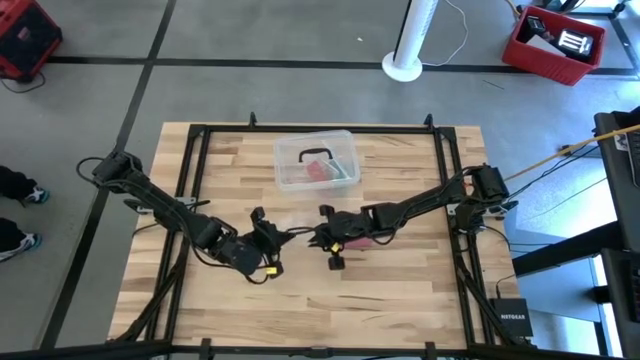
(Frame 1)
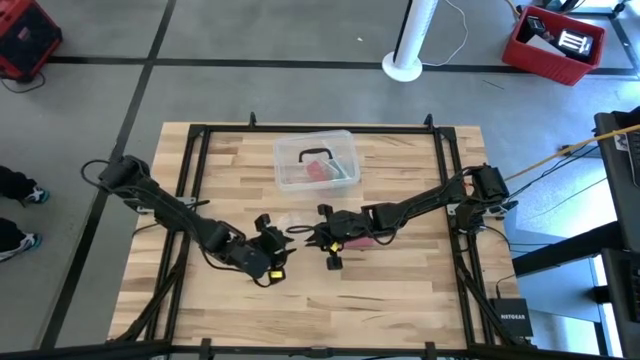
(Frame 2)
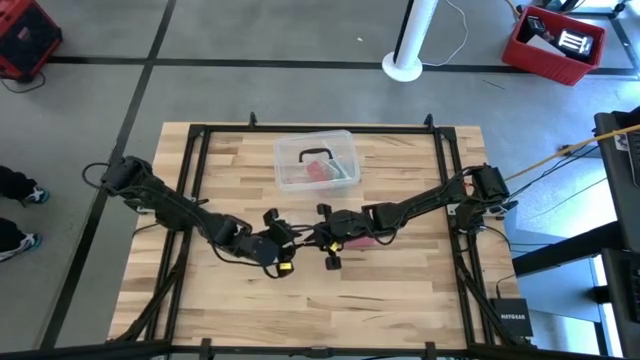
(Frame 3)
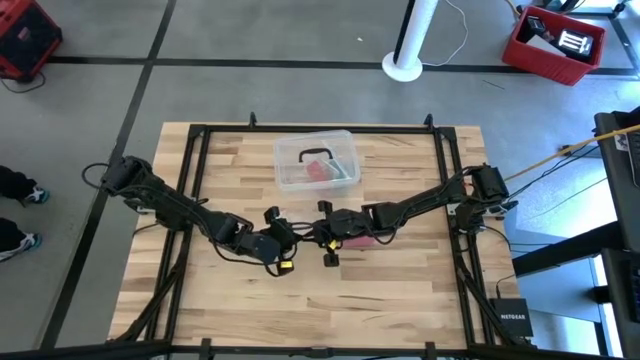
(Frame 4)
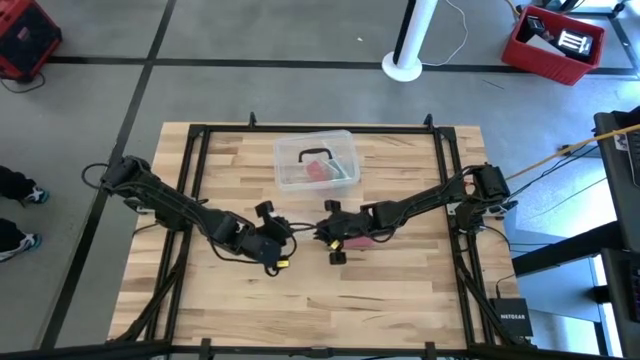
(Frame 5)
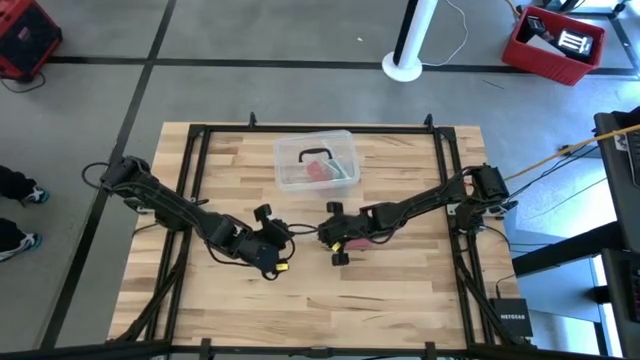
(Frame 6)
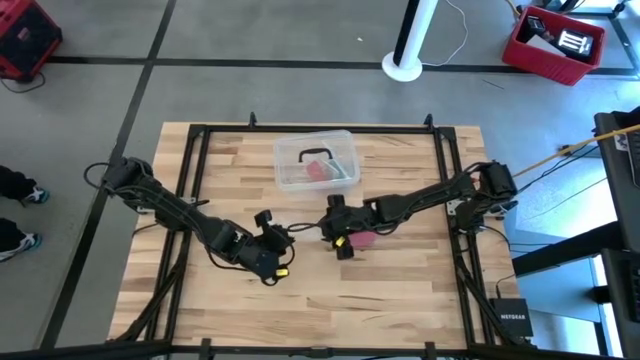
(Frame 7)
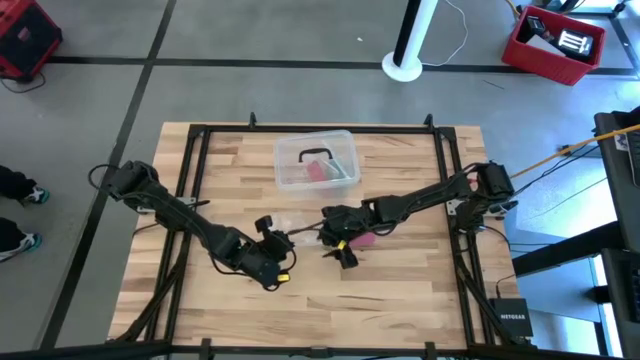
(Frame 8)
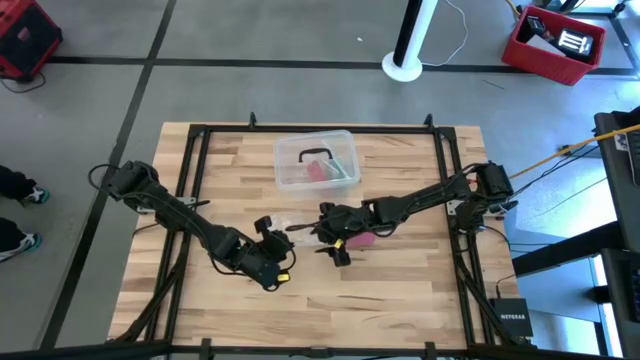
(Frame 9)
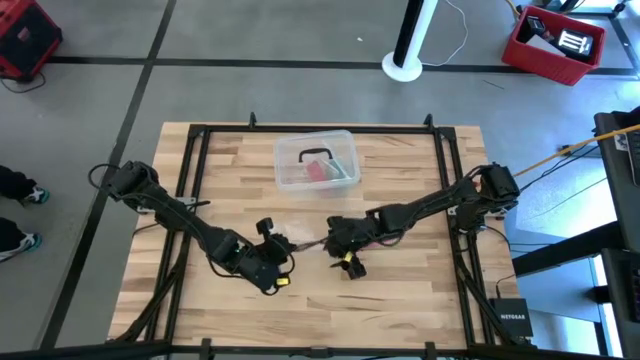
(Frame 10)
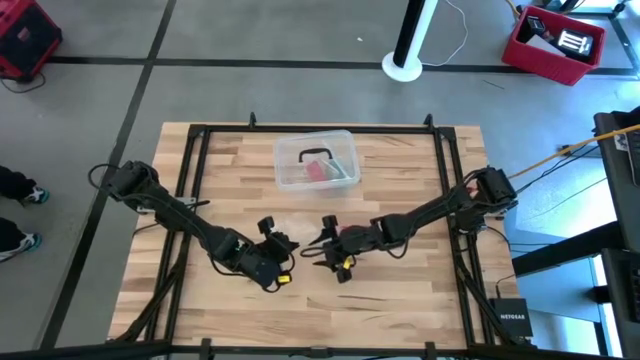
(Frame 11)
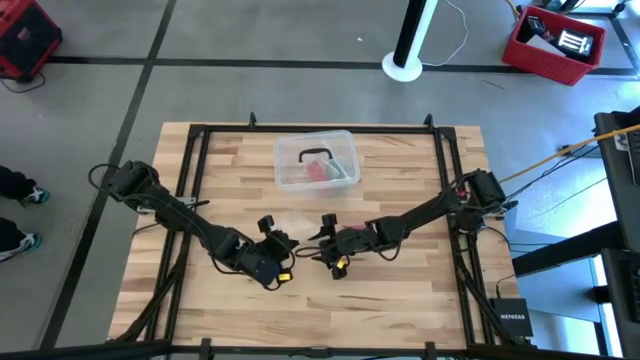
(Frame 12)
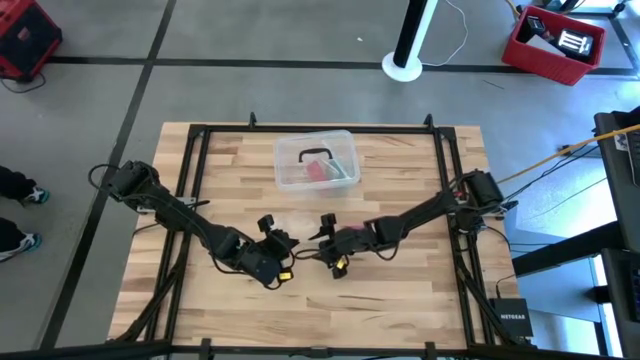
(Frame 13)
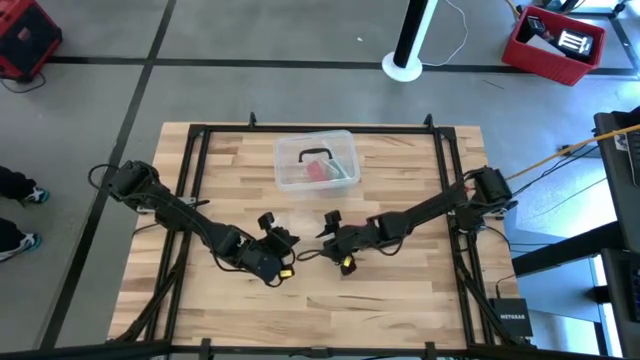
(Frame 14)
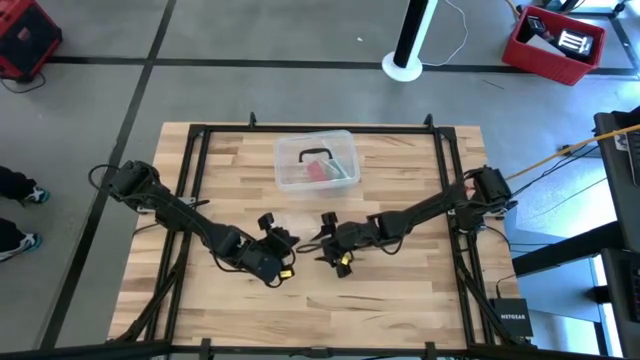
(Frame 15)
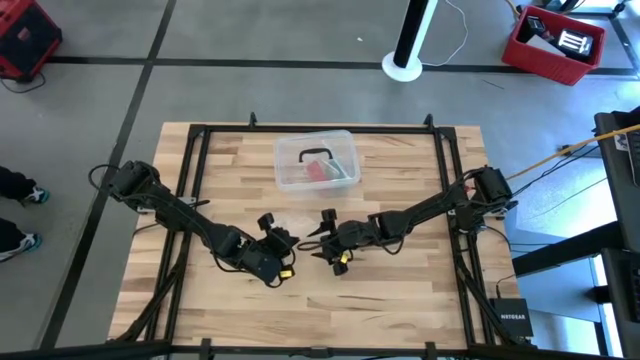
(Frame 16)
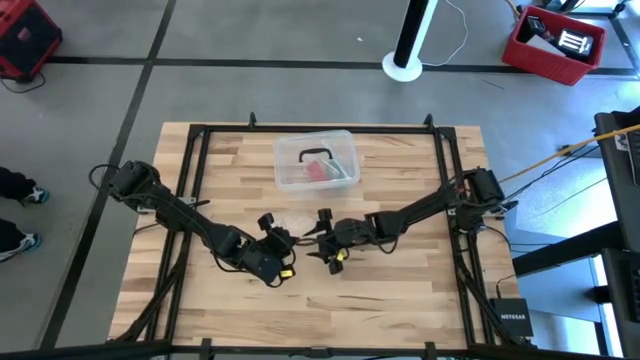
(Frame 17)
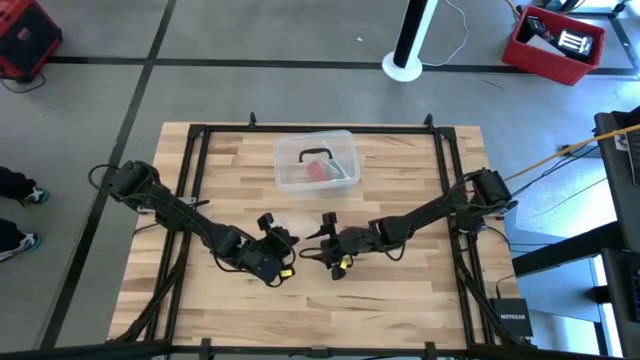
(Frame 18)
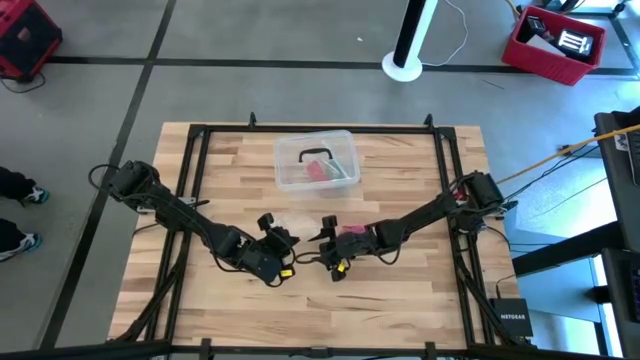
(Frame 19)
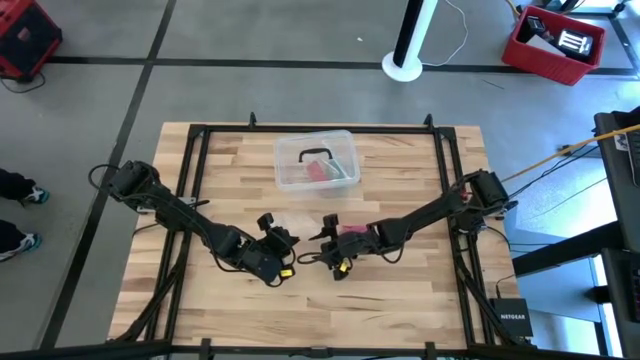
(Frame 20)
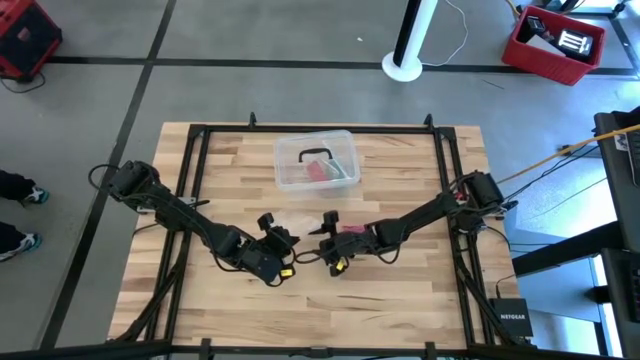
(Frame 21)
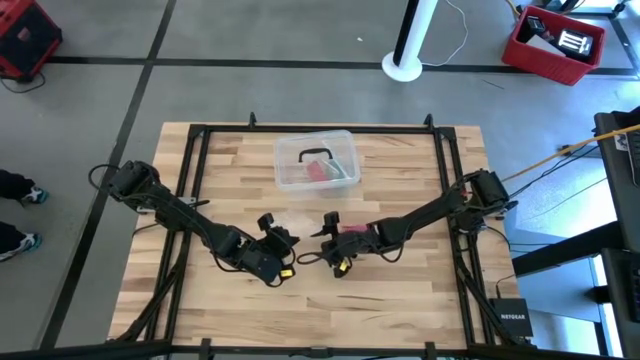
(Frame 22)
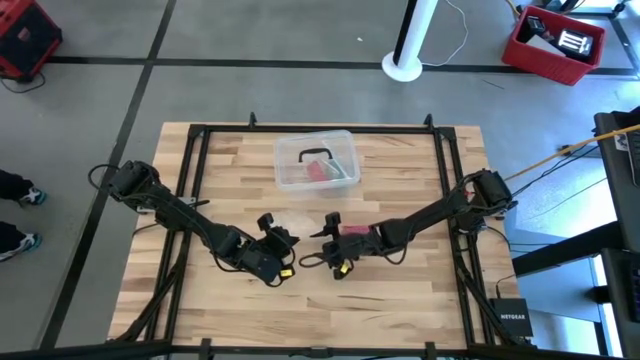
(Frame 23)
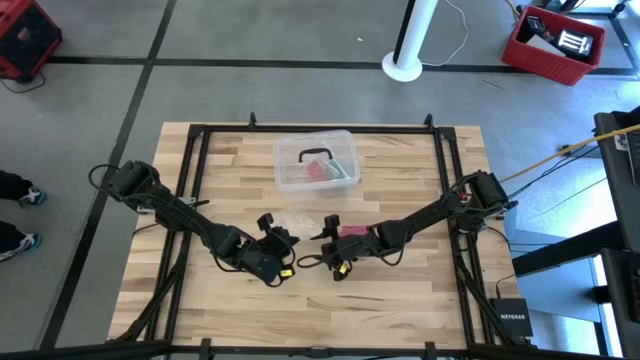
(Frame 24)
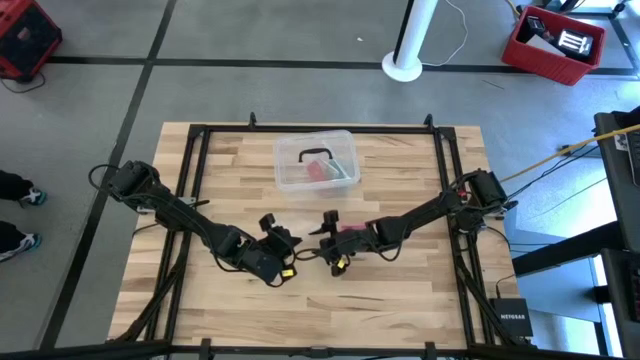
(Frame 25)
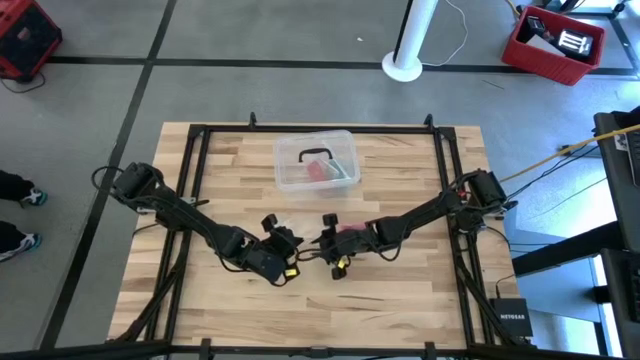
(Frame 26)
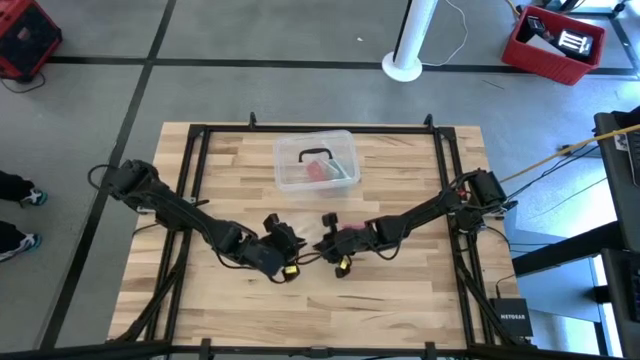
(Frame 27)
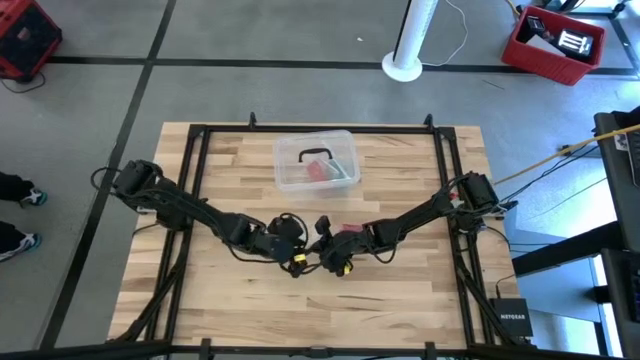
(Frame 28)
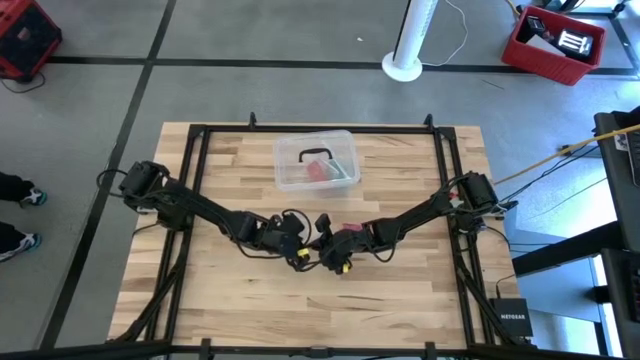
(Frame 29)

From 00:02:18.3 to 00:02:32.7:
Task: Roll bandage
Open the transparent zip bag

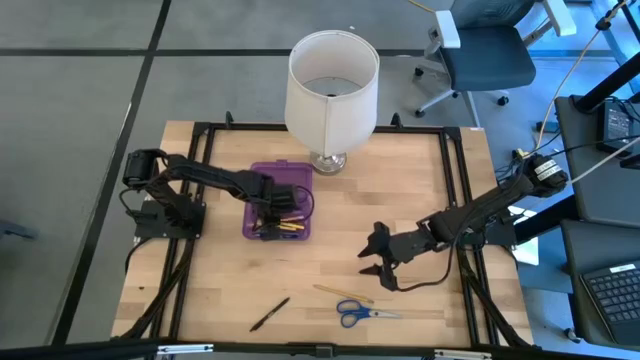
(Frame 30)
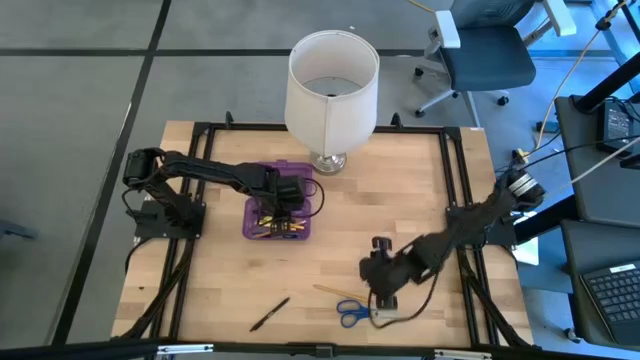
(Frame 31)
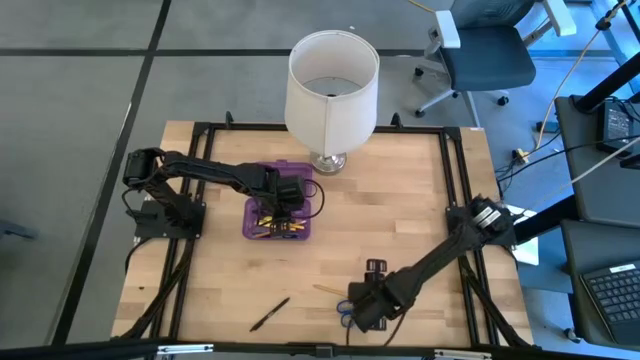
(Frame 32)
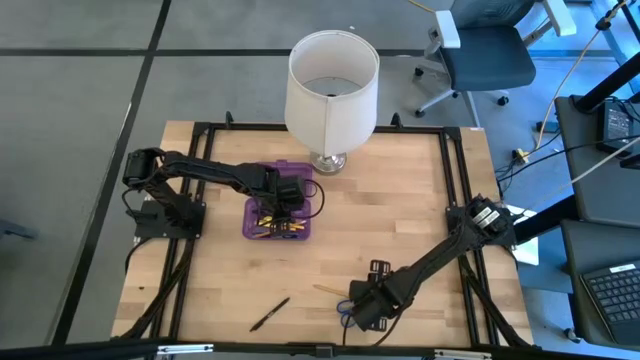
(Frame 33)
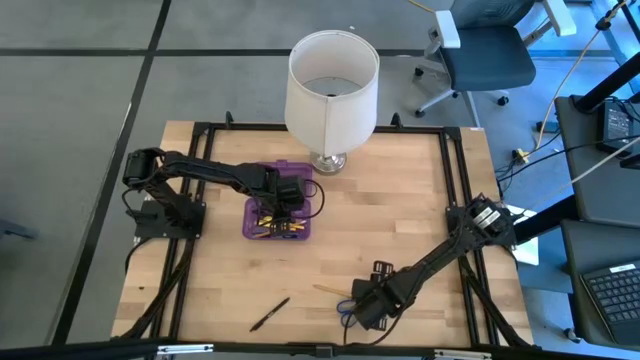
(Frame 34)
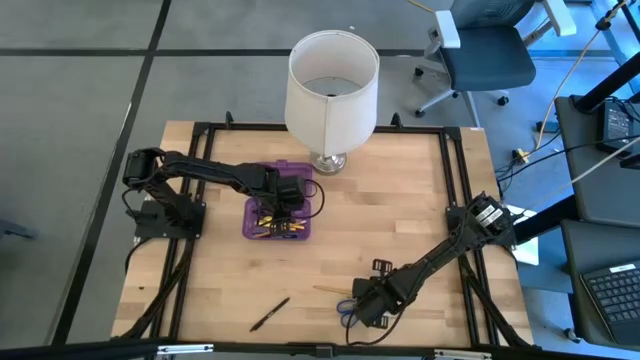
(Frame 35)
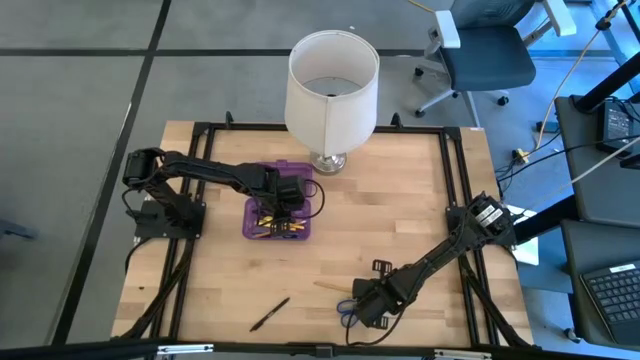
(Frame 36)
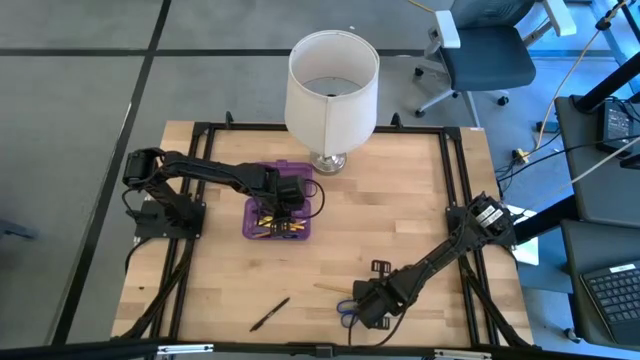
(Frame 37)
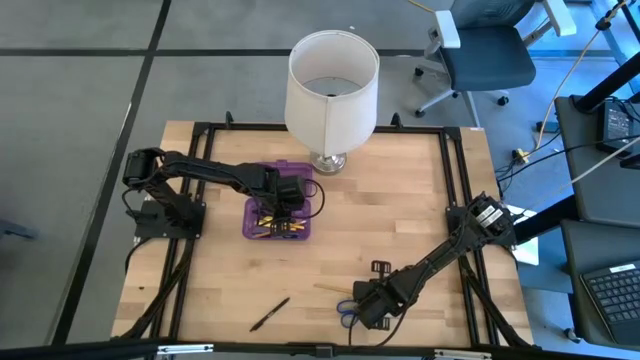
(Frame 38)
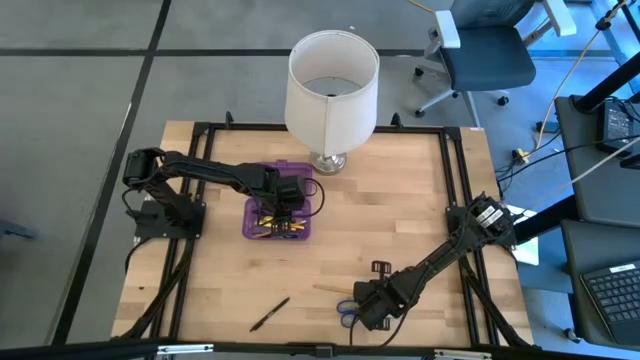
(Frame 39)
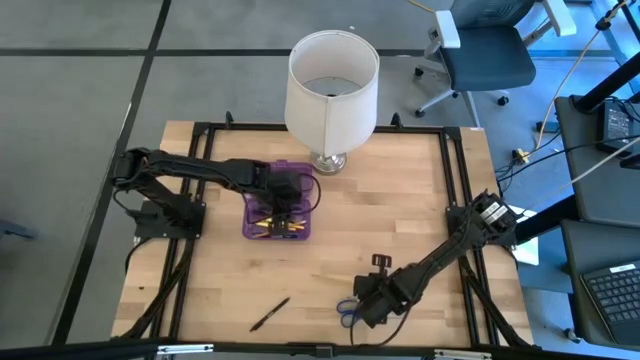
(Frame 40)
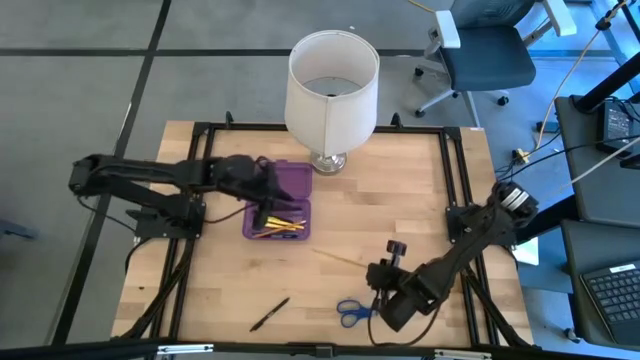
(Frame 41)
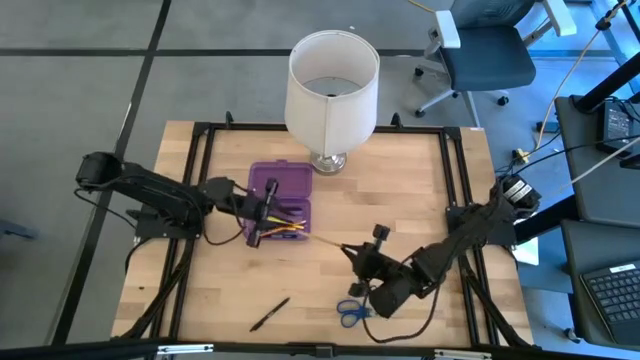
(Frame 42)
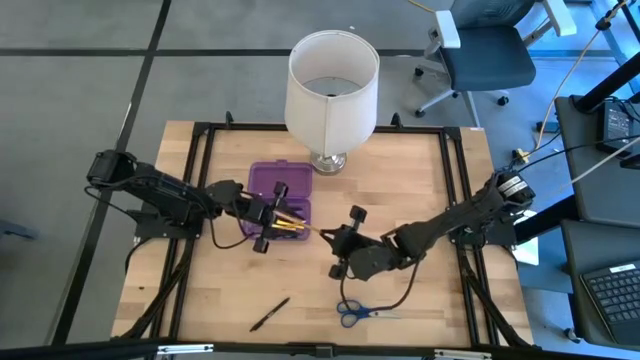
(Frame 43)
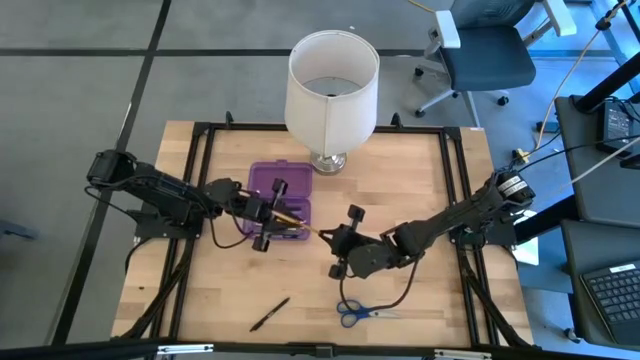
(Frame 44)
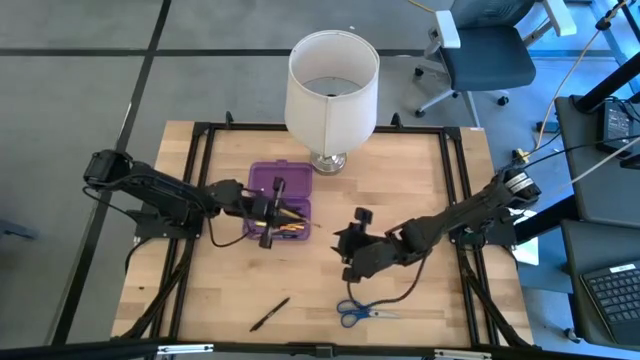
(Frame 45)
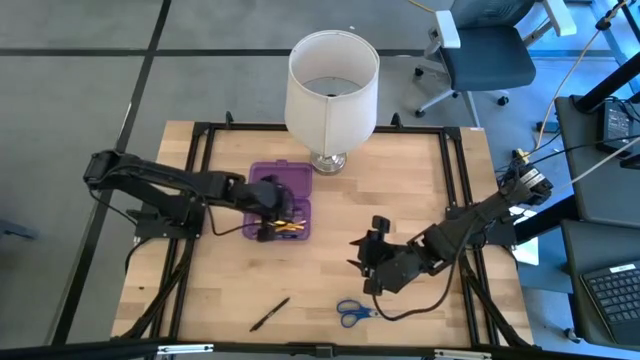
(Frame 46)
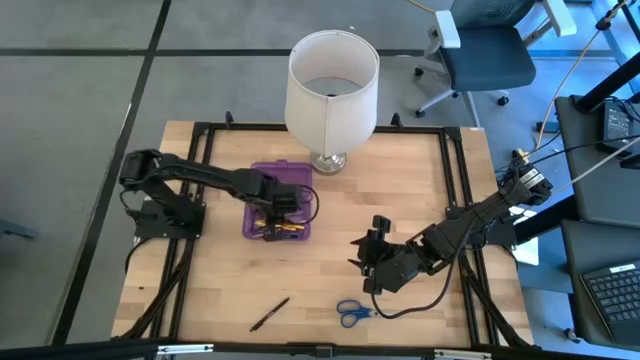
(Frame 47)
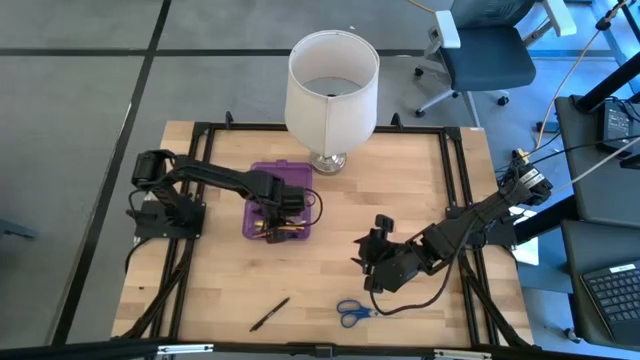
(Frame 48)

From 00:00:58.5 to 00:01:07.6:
Task: Pick & place school supplies into a supply box
Put the yellow pencil into the purple supply box
